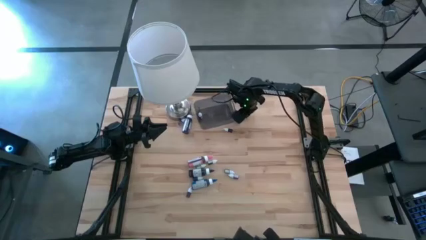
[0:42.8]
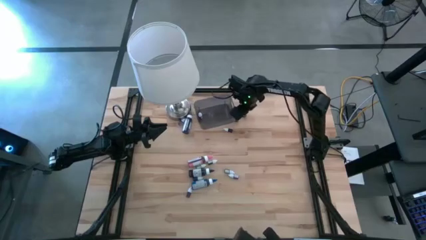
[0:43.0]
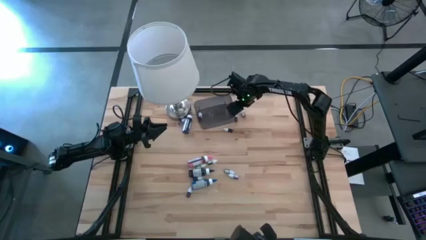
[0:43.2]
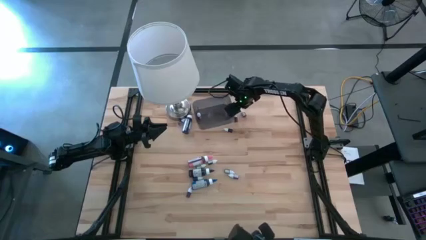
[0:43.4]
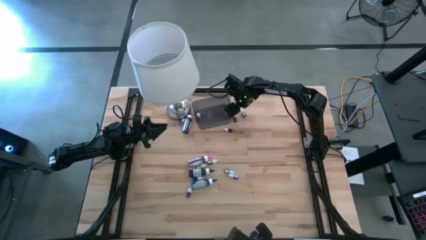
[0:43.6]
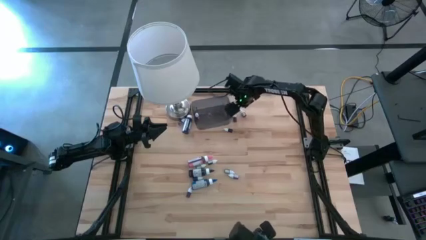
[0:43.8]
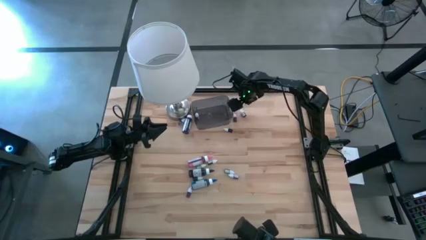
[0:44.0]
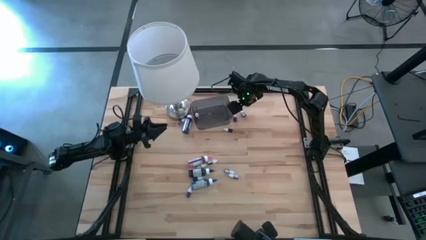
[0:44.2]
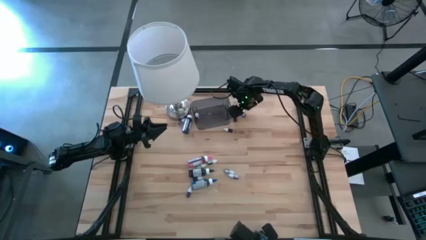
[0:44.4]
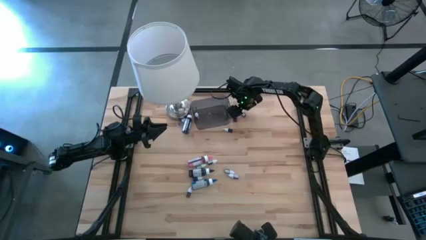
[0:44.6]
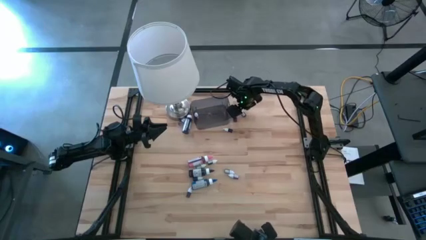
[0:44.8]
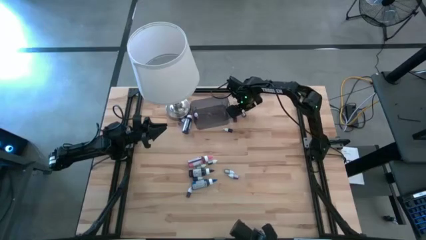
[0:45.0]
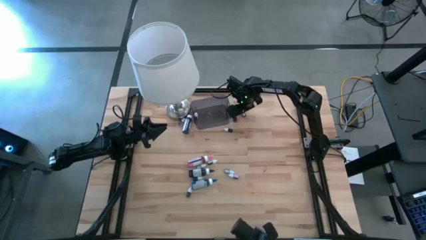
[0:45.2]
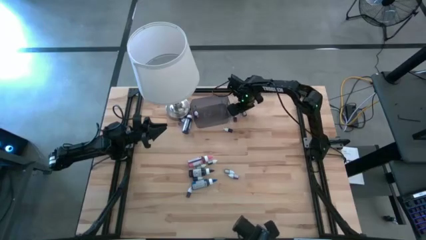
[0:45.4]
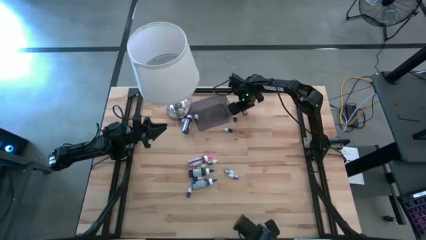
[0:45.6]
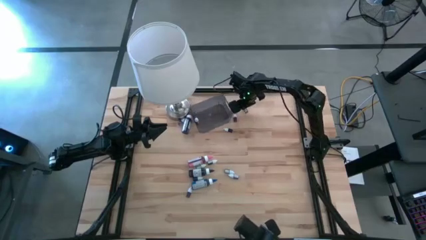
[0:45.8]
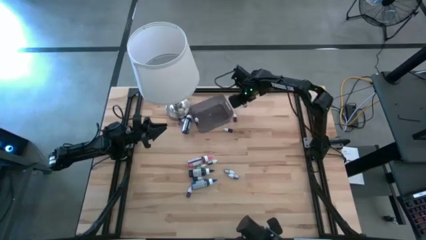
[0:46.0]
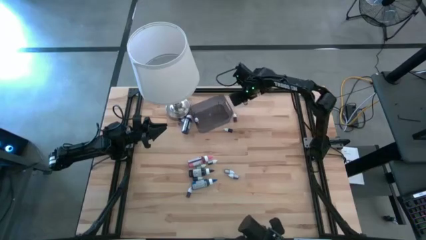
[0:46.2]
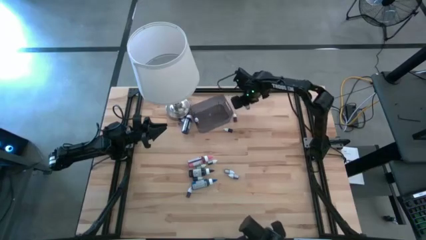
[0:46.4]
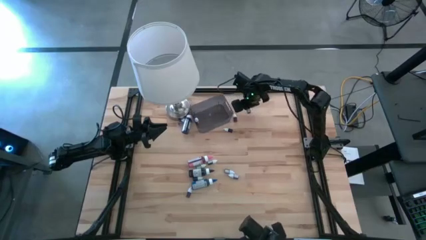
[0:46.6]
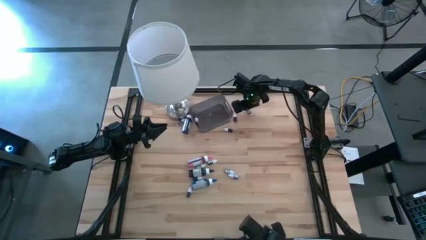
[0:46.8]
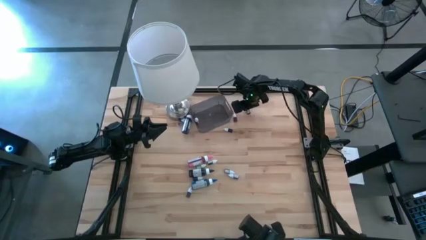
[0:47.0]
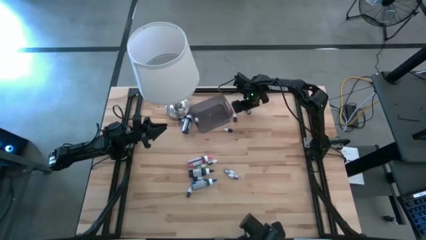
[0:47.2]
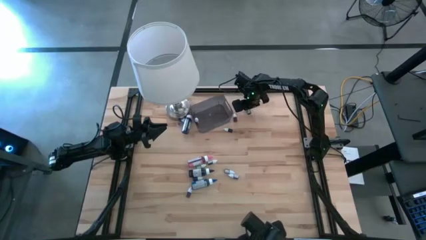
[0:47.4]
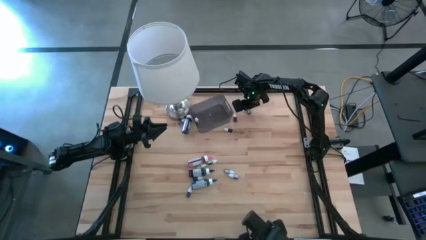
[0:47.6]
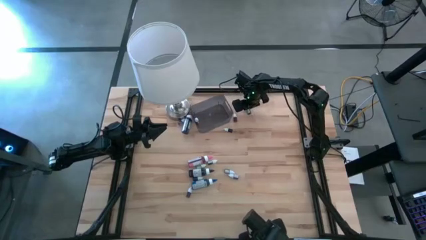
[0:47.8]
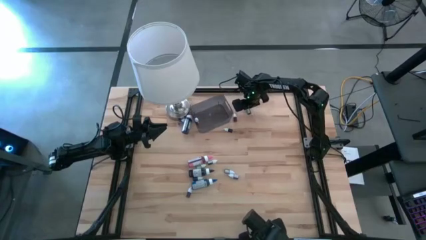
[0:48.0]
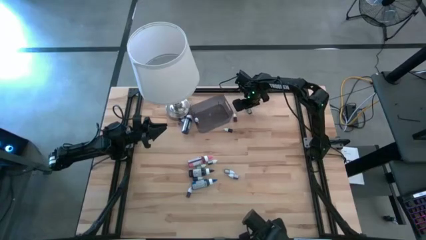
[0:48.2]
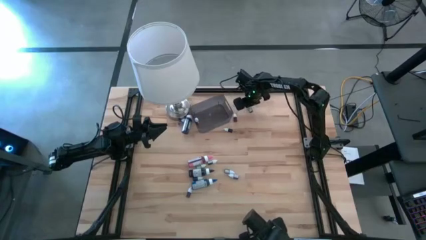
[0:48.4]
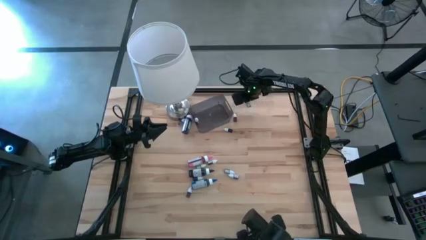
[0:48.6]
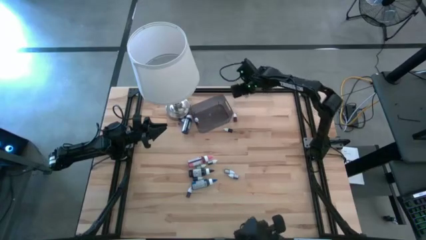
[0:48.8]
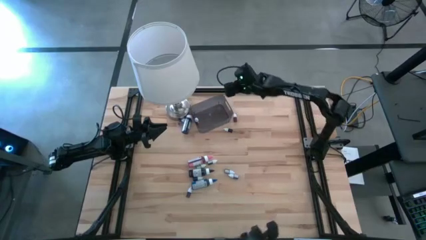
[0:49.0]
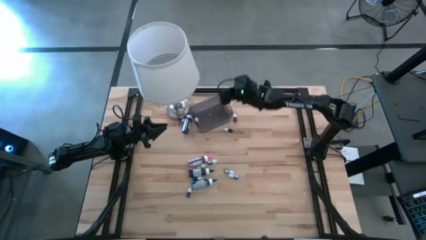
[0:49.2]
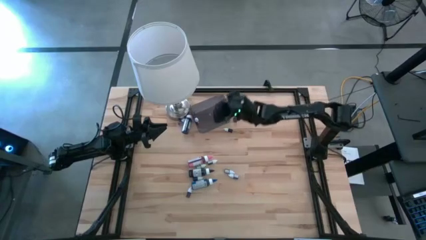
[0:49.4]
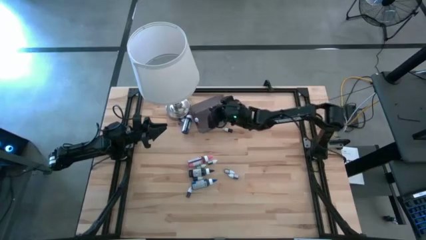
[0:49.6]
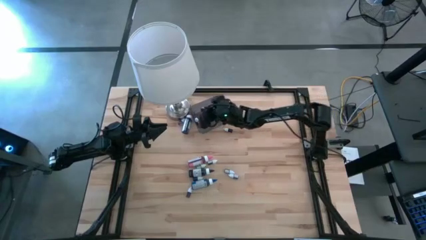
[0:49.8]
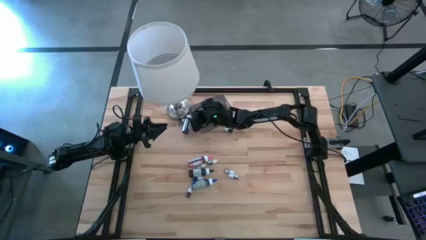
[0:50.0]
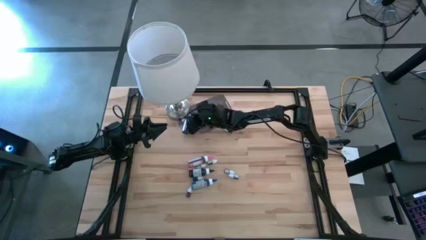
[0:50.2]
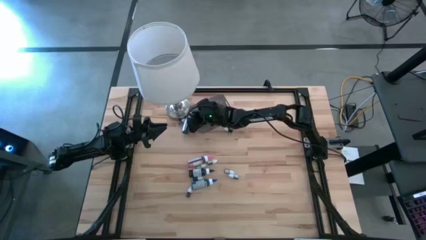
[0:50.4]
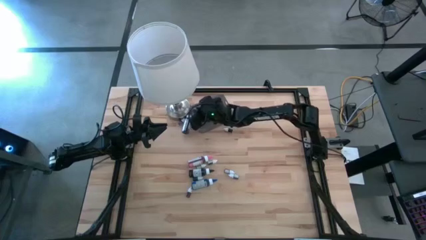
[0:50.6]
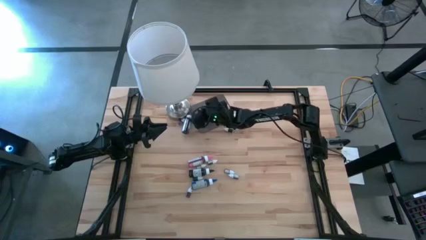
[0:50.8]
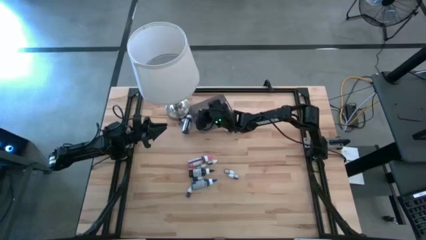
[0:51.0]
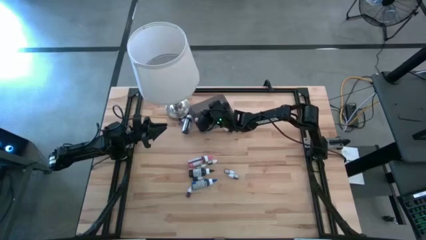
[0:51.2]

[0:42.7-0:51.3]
Task: Pick & Place food coloring
Put the top small black food coloring bottle into the bin

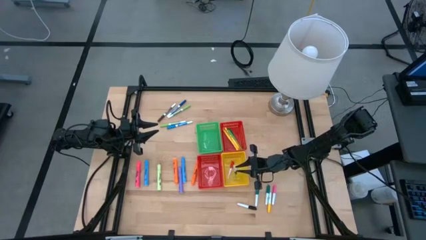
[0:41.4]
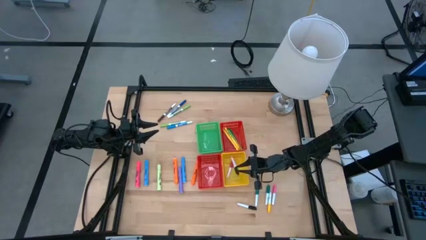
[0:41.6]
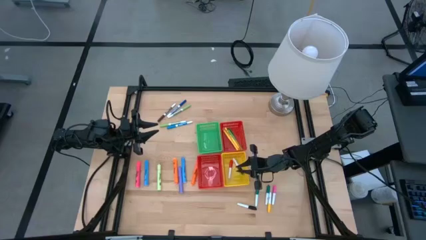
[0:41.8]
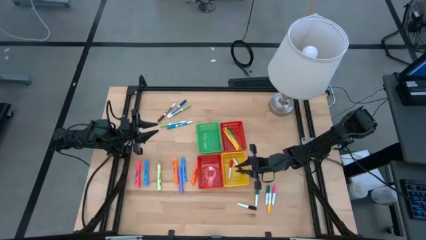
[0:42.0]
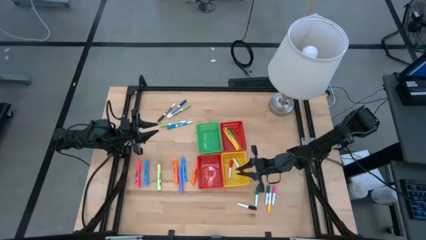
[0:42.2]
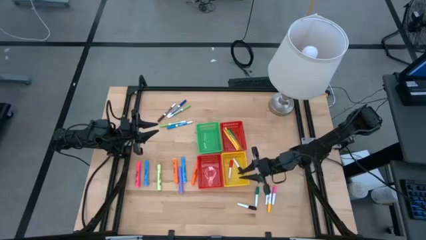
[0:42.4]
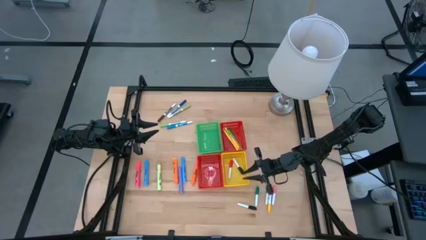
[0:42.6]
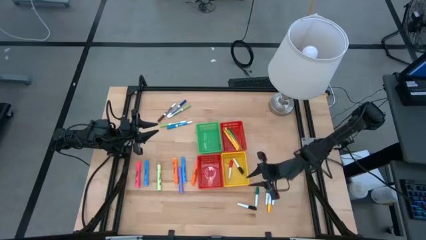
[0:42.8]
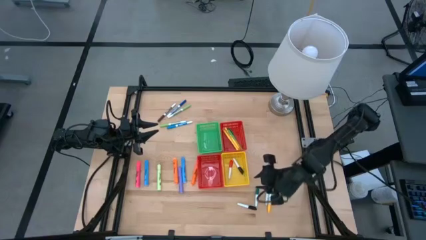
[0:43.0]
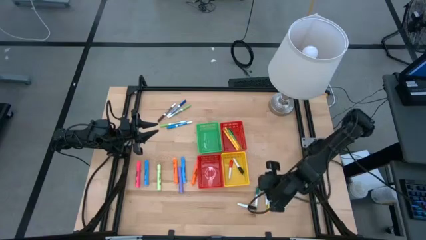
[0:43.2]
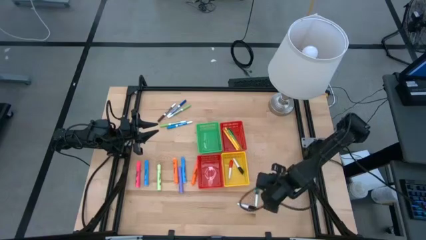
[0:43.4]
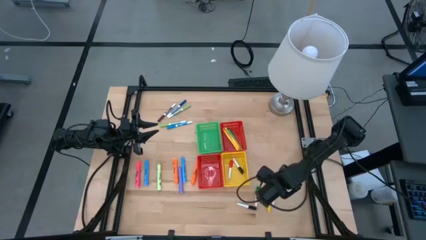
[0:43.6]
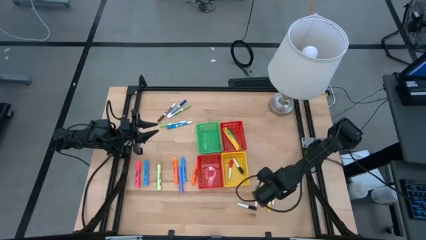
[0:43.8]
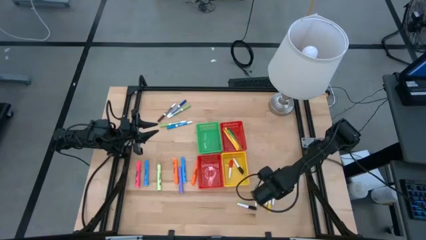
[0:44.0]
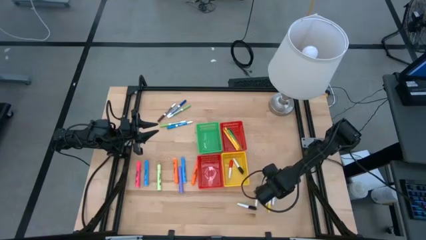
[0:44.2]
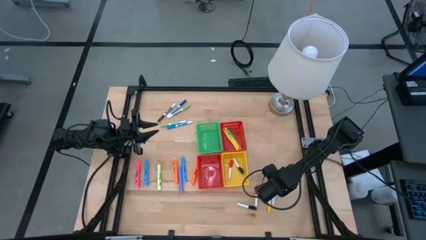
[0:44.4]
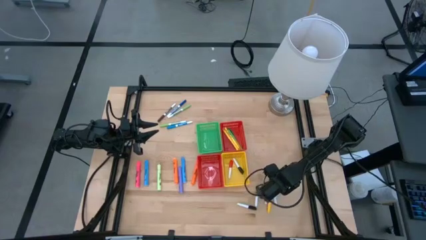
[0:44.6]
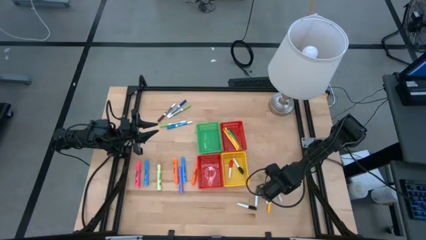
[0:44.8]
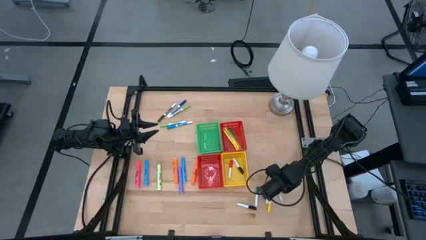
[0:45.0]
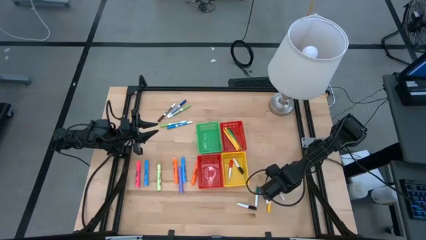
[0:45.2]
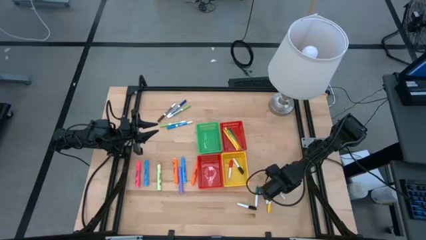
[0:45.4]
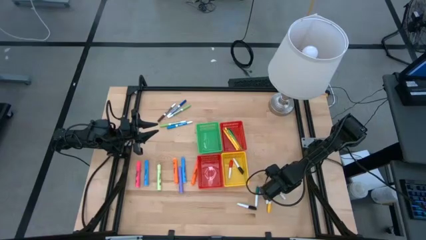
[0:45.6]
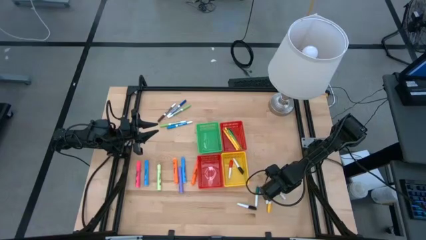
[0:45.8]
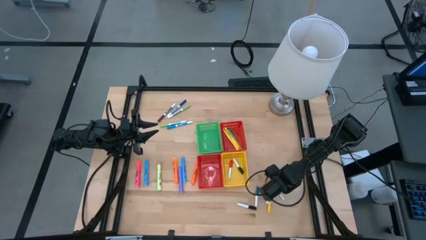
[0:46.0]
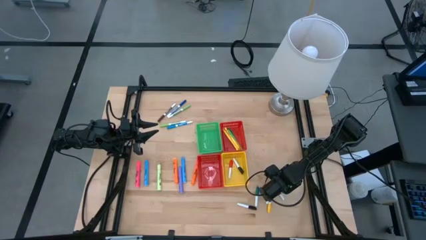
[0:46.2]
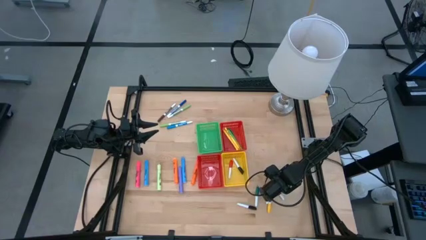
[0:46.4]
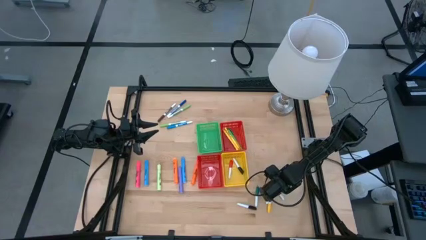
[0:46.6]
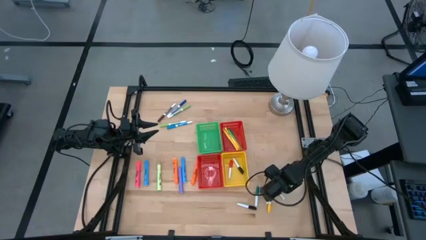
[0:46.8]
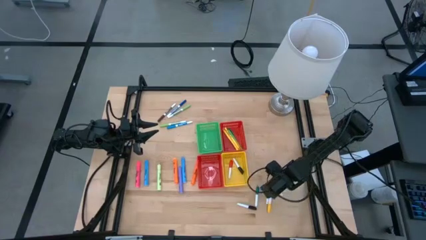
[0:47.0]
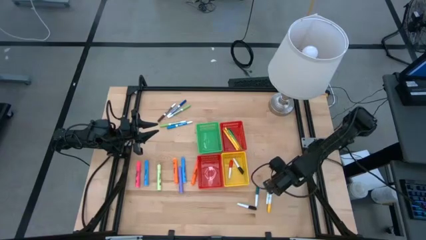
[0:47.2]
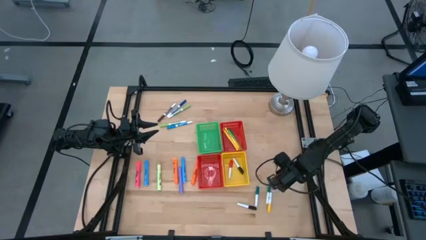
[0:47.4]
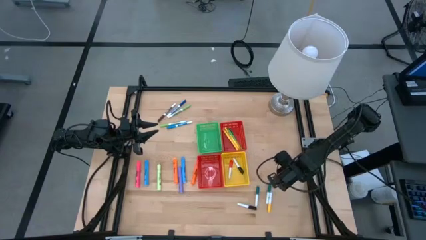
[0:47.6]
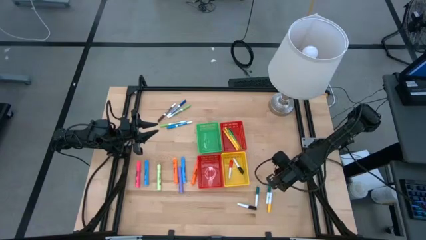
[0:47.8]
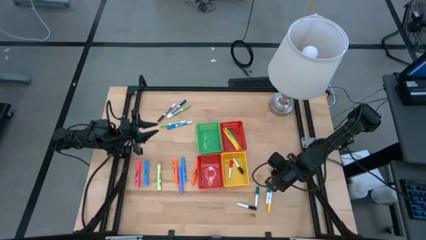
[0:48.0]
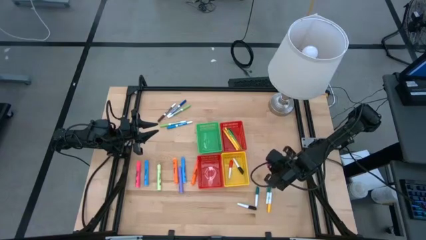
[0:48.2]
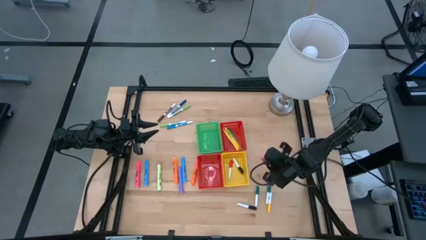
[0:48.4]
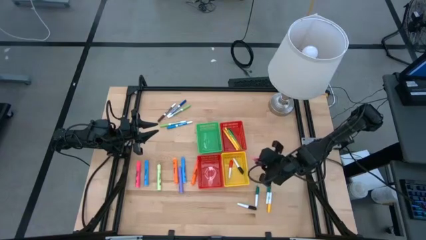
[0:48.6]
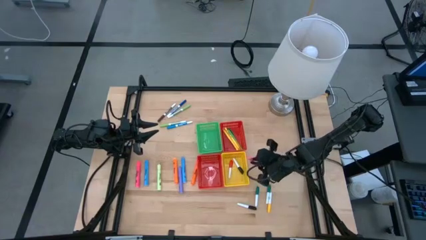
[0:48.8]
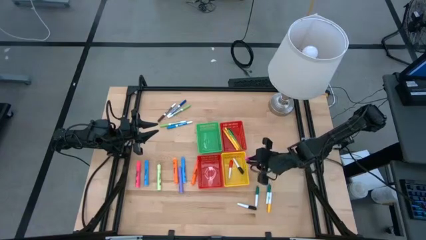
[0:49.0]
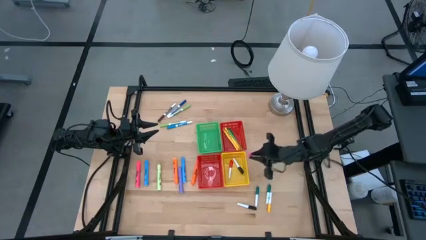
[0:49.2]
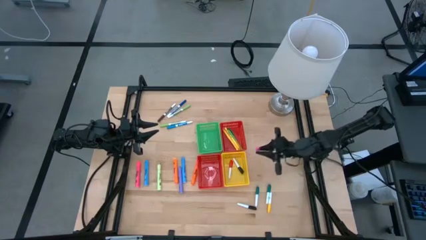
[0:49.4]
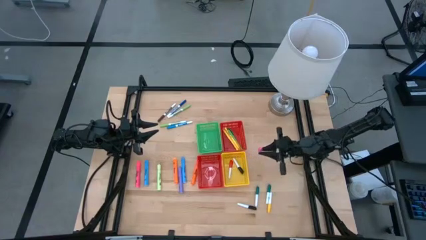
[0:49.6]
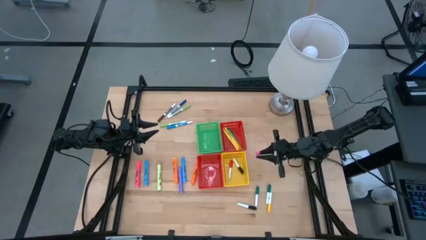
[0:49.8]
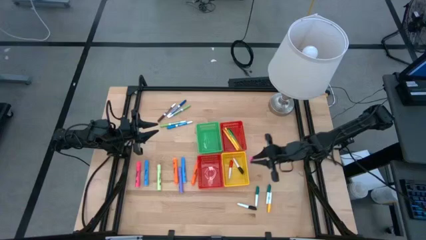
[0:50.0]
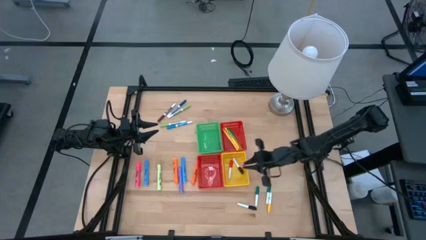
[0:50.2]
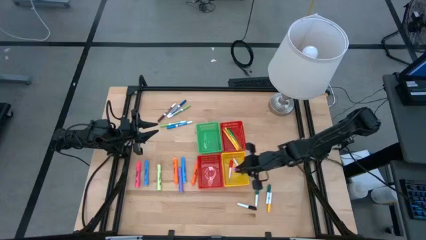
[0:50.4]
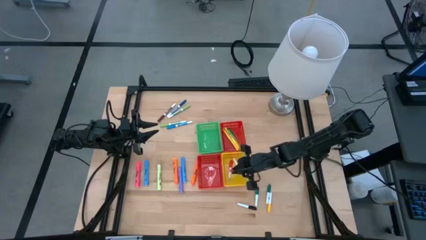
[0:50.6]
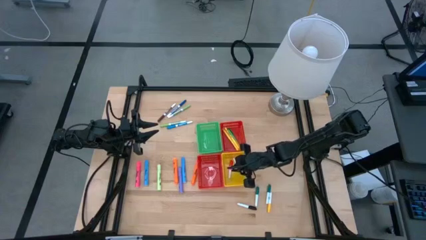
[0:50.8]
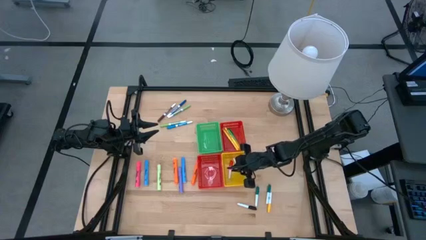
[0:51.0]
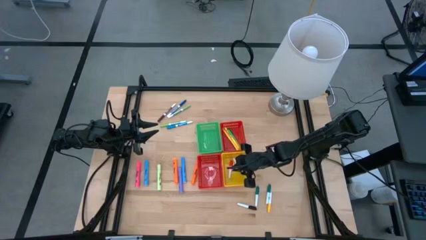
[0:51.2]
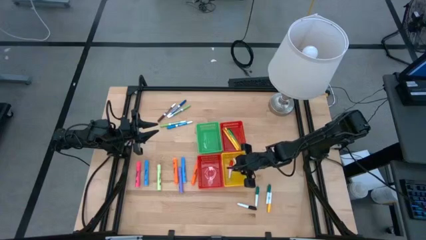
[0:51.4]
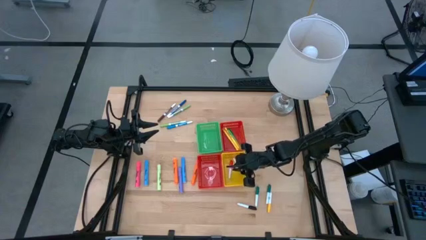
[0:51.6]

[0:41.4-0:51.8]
Task: Pick & Place Markers
Put the small pink highlighter pen into the yellow bin
